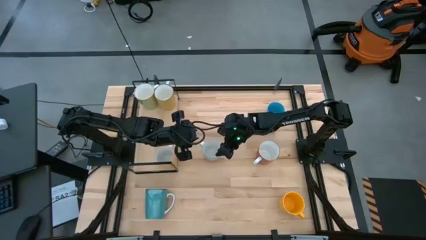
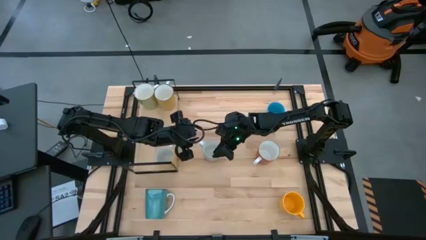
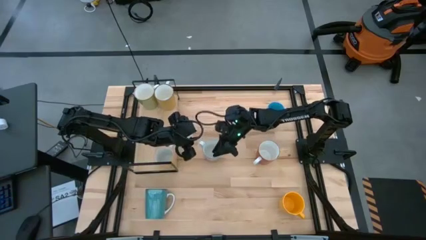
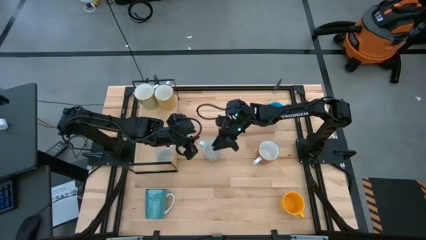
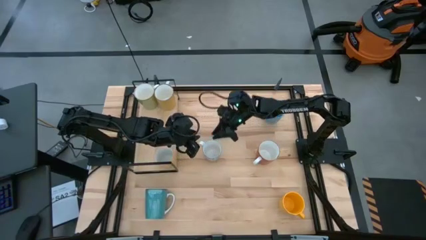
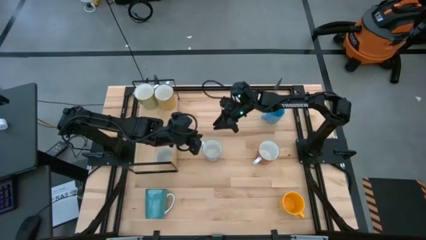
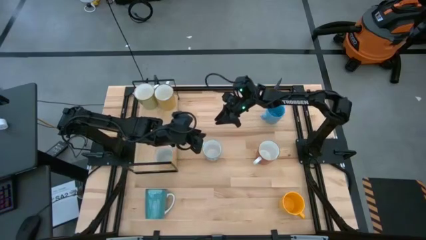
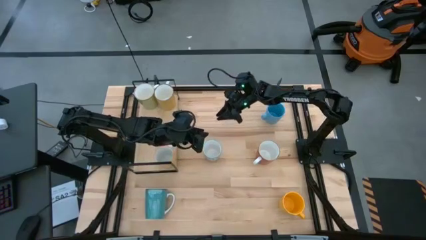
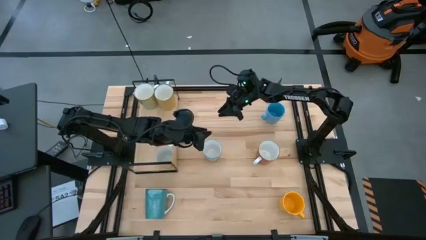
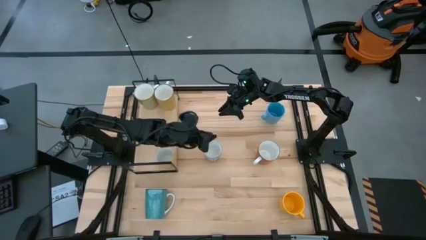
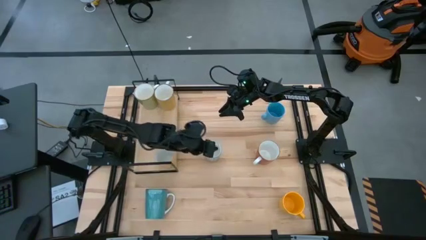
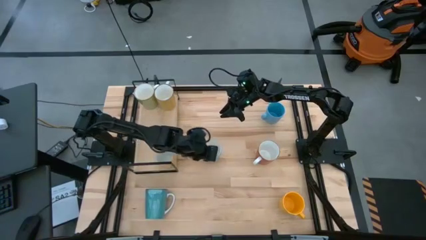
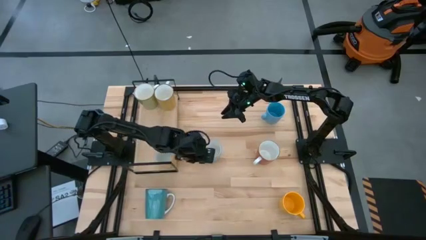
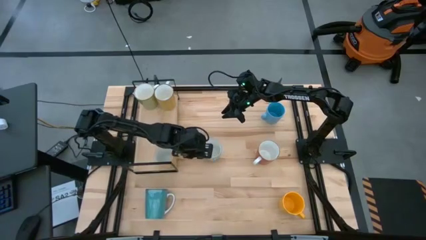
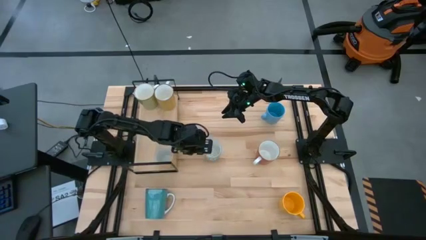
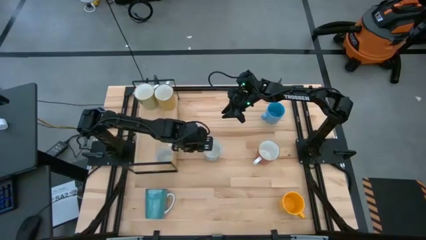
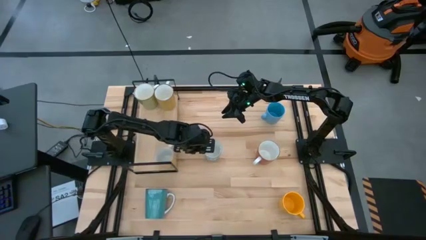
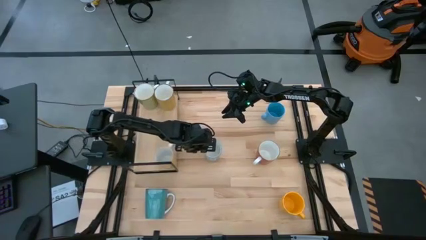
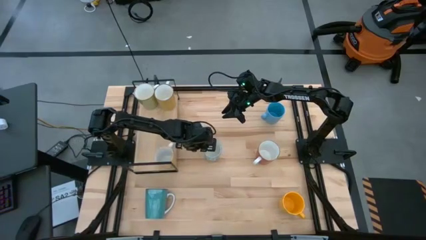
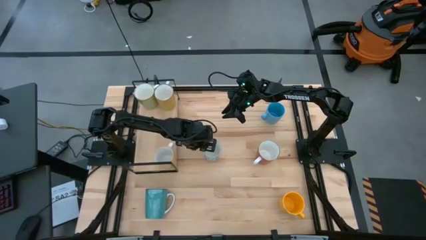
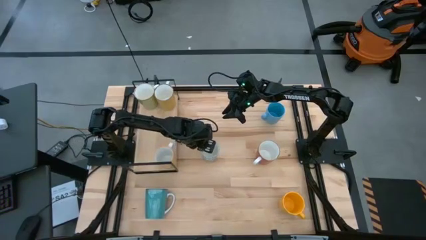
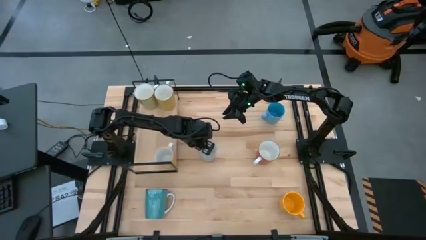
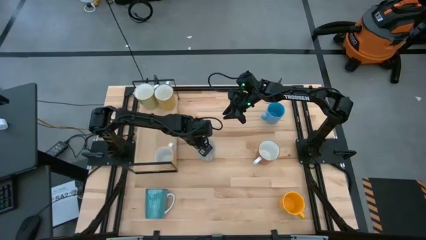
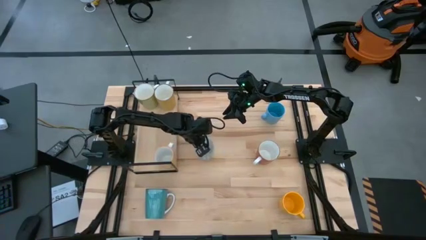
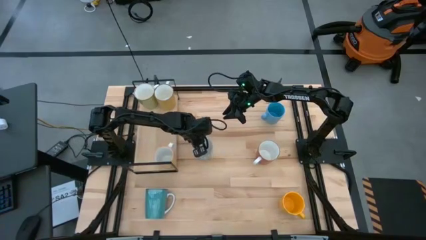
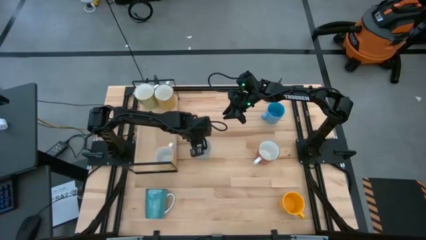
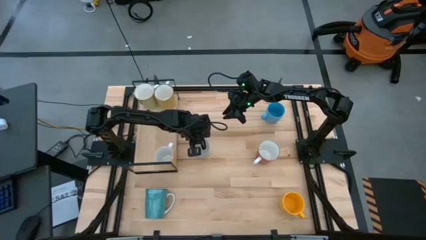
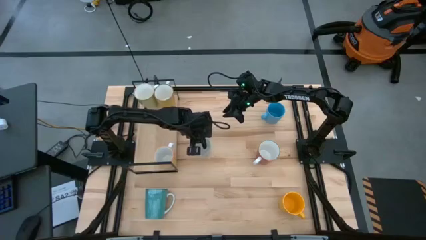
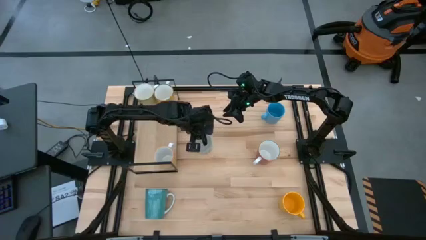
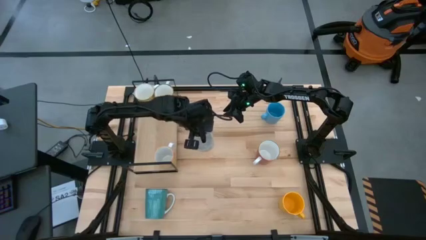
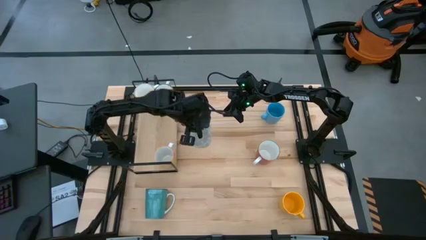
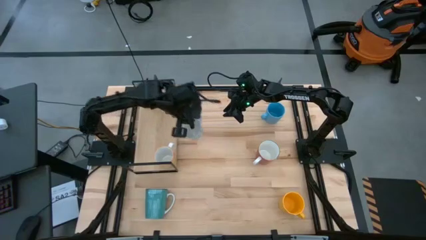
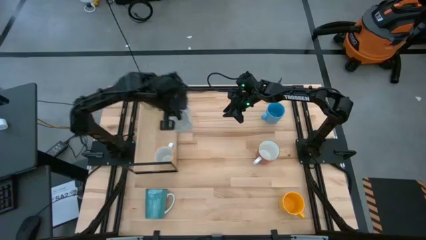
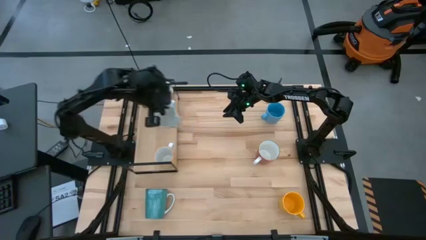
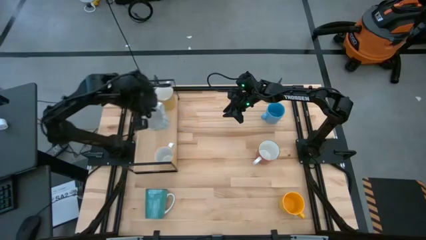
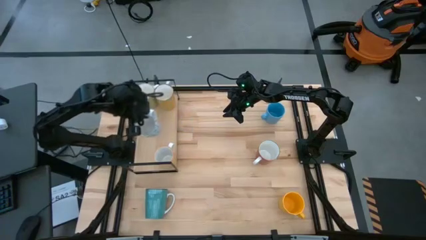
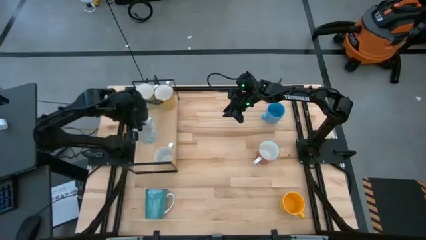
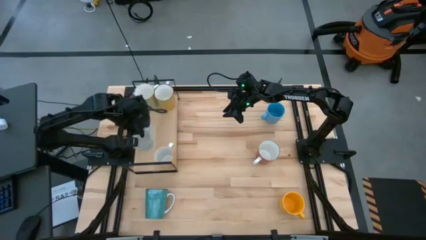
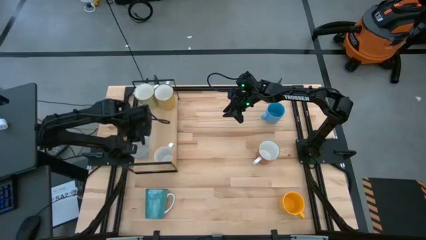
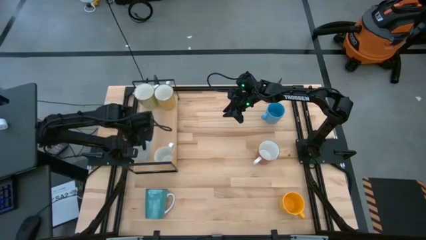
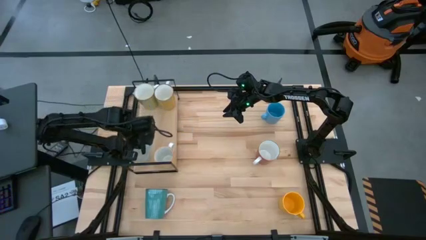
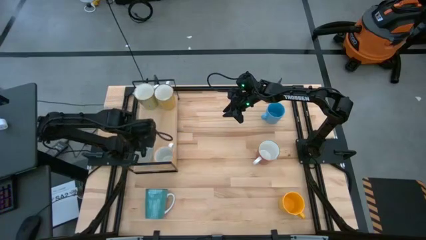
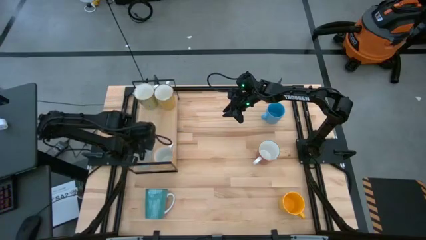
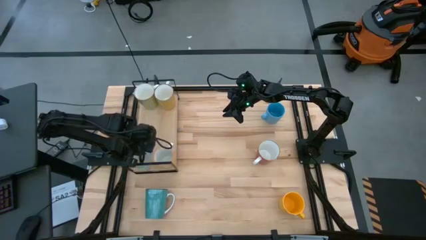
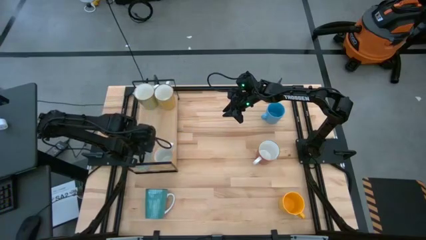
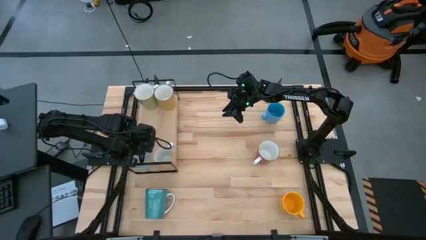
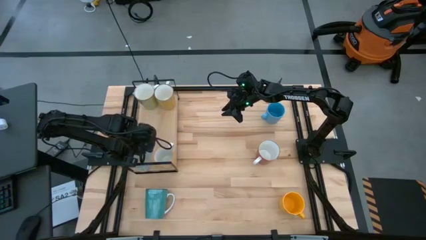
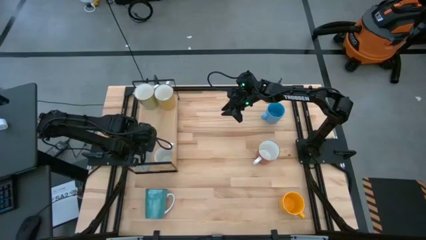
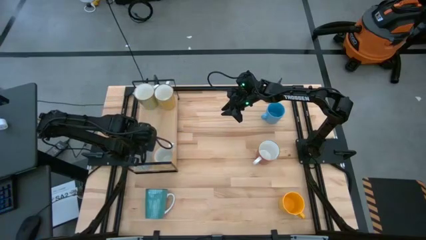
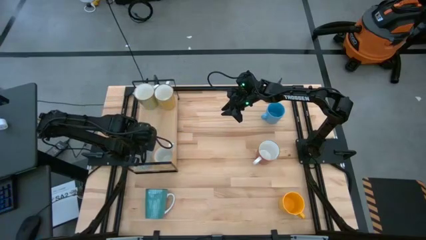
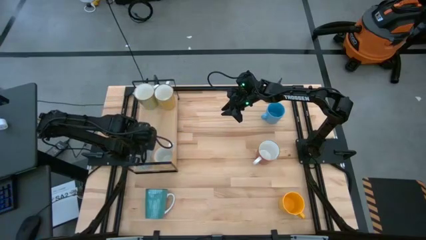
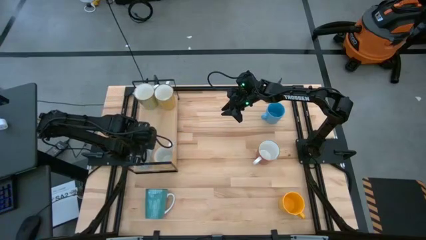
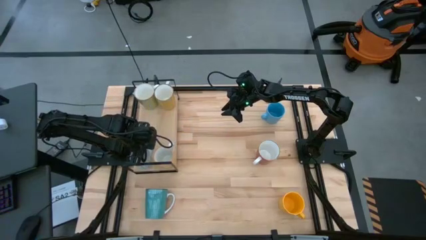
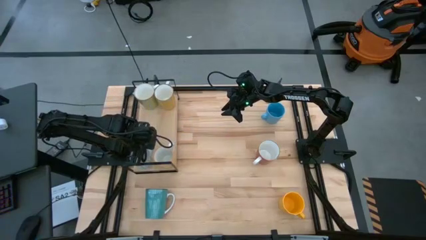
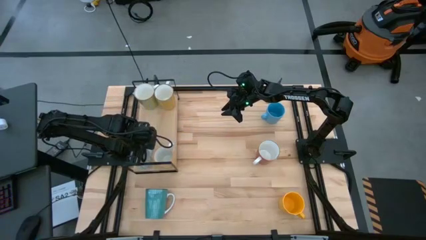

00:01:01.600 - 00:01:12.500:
Task: Place coffee mugs
Put the blue patterned mug on the shelf

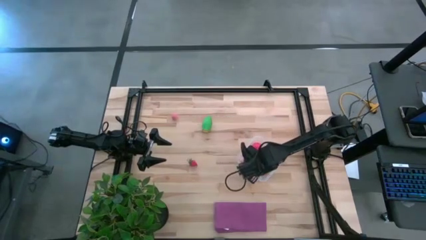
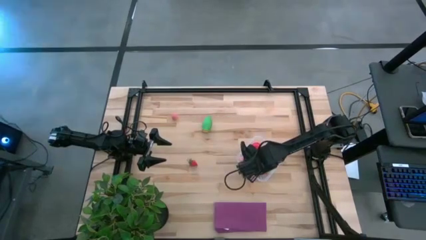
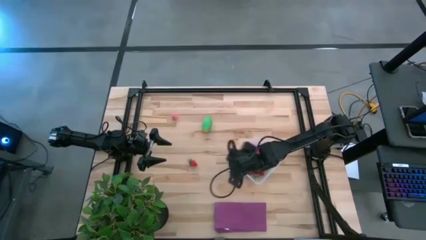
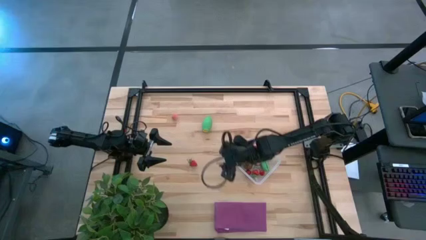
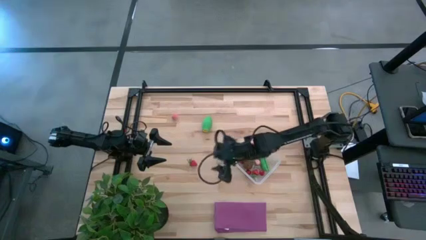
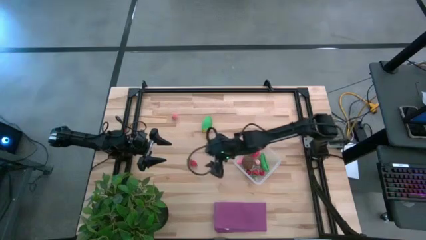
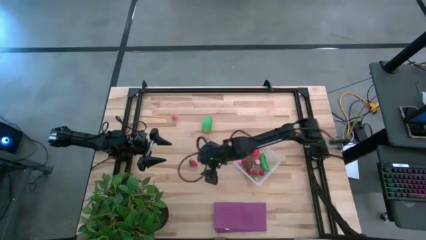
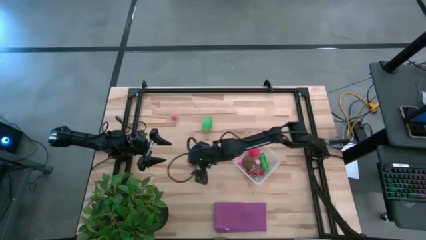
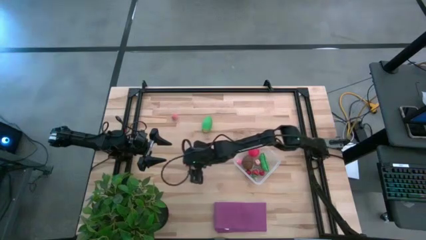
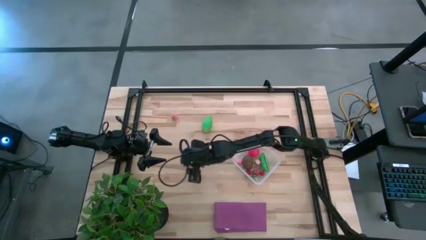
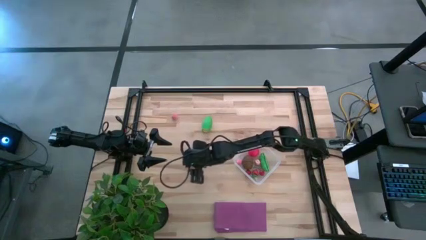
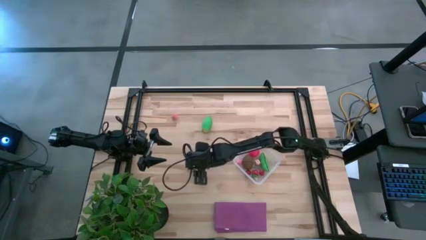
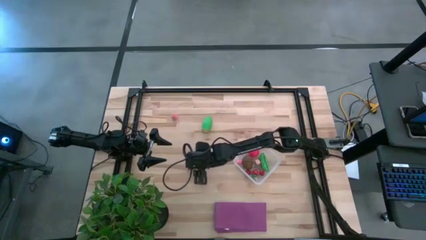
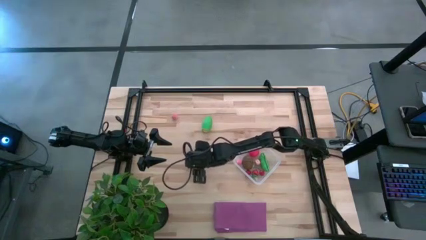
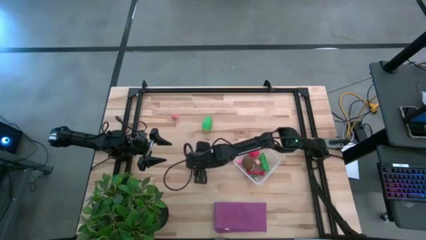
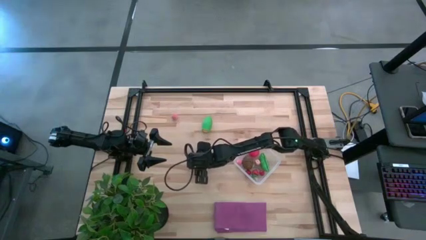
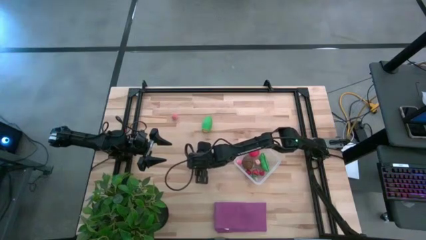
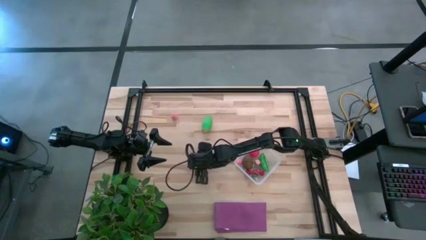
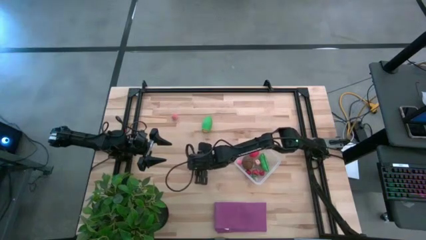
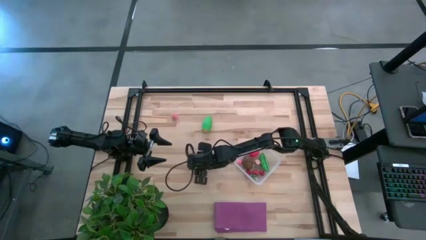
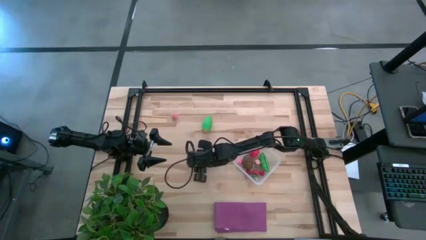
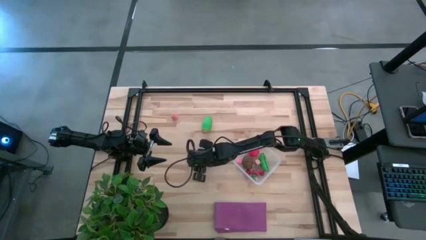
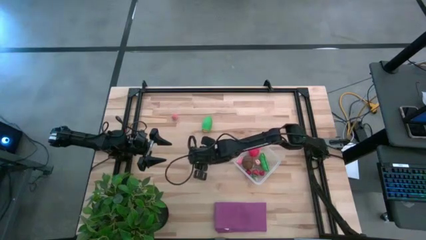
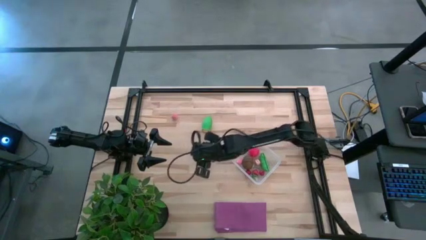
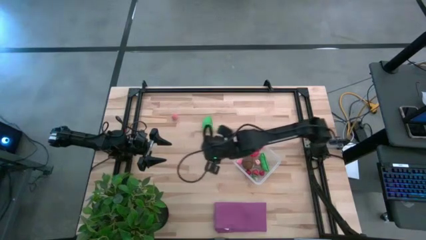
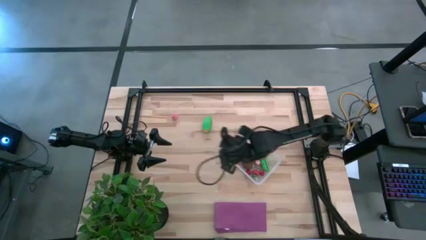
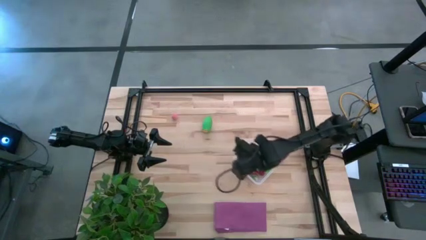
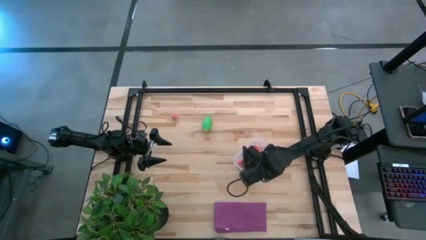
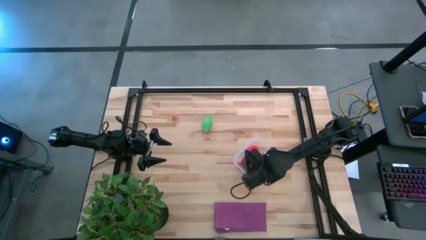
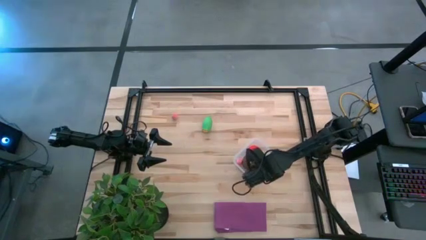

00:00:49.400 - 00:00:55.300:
Task: Pick and placing Produce into tupperware
Put the red strawberry into the transparent bin
